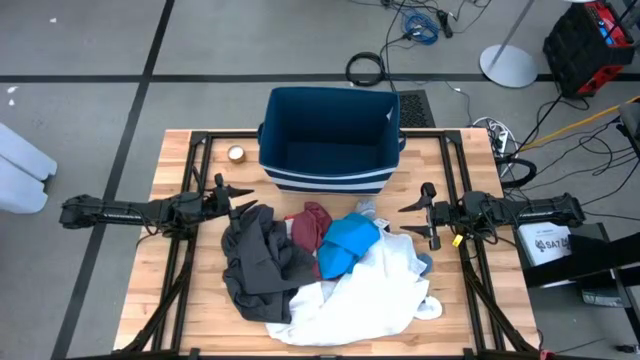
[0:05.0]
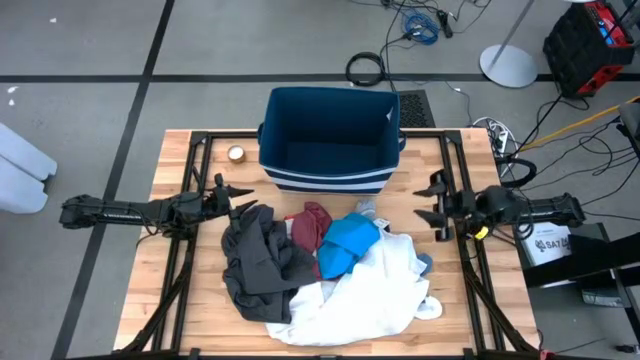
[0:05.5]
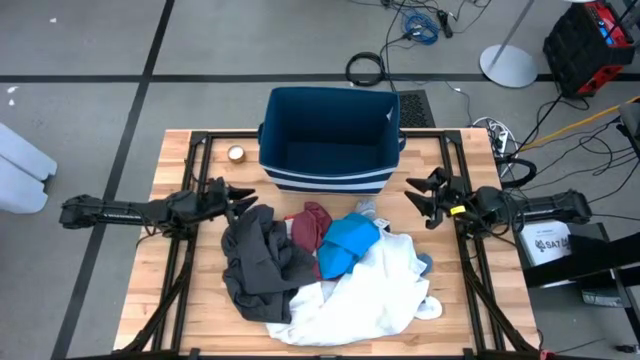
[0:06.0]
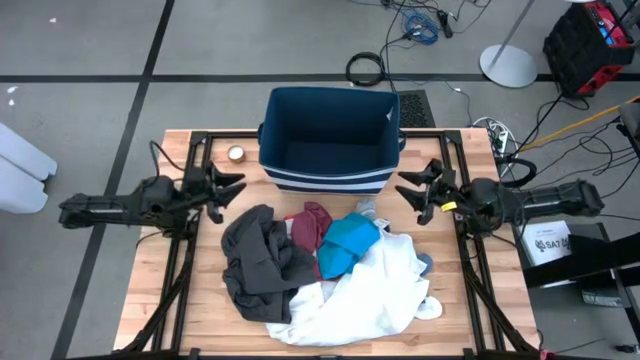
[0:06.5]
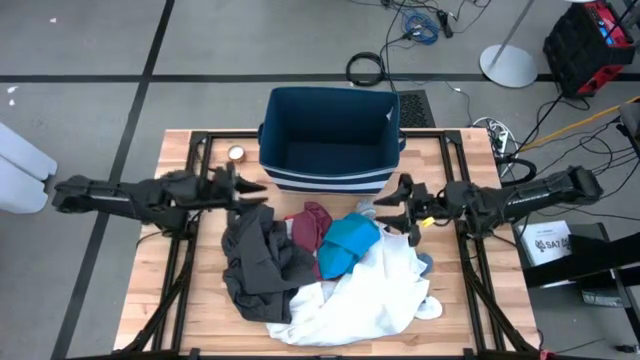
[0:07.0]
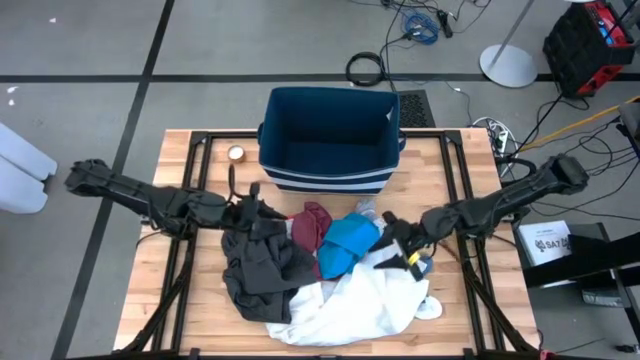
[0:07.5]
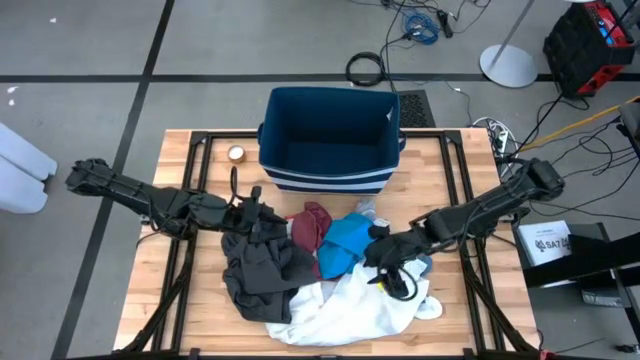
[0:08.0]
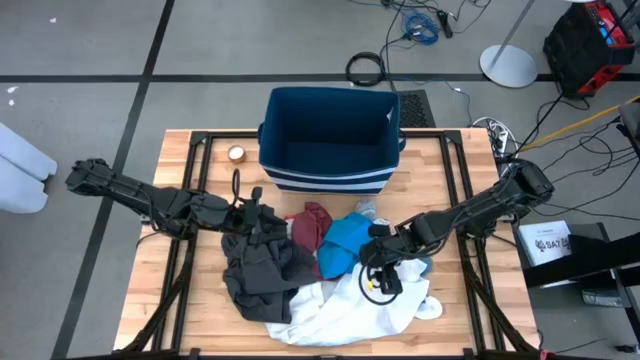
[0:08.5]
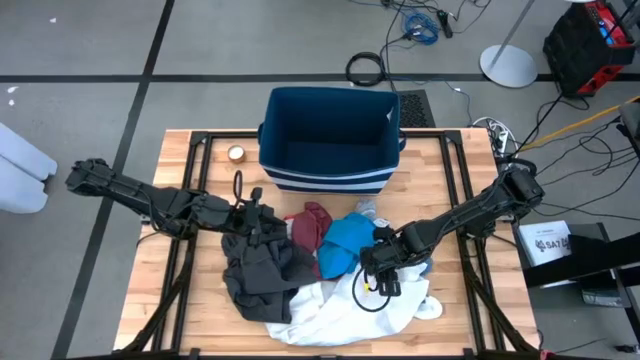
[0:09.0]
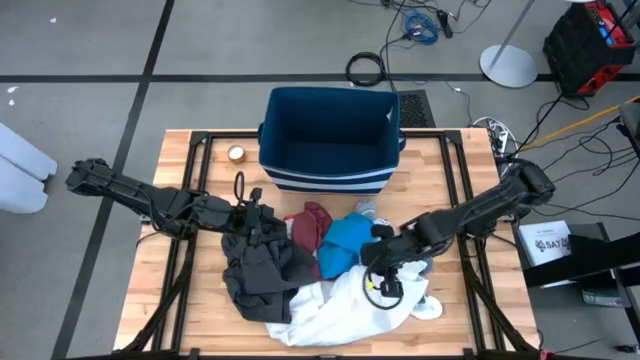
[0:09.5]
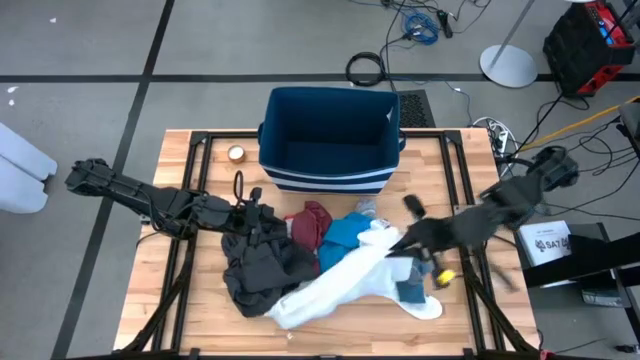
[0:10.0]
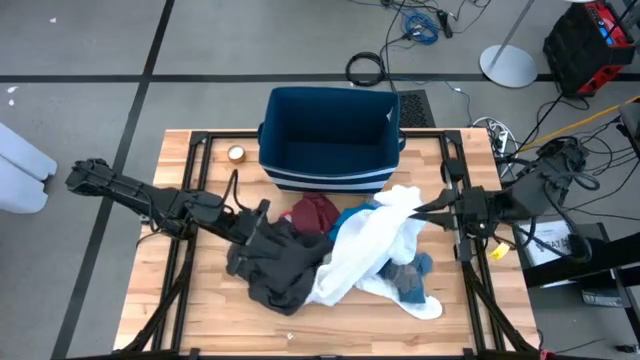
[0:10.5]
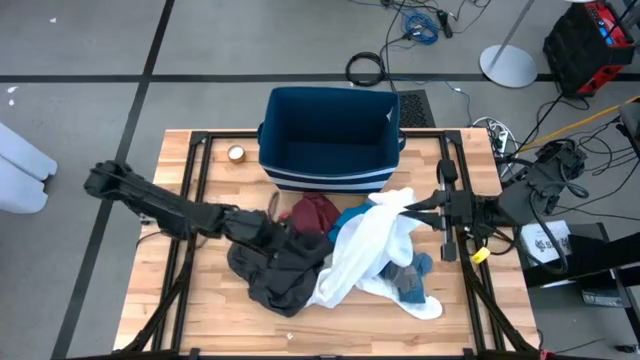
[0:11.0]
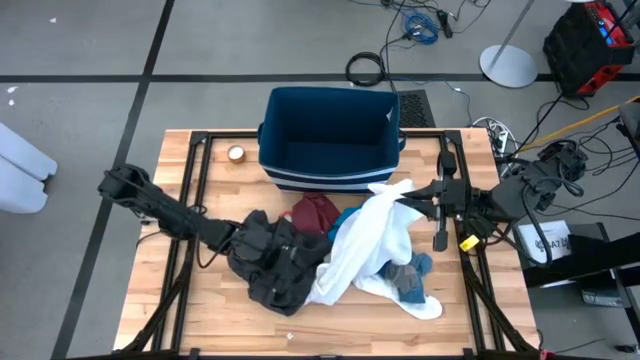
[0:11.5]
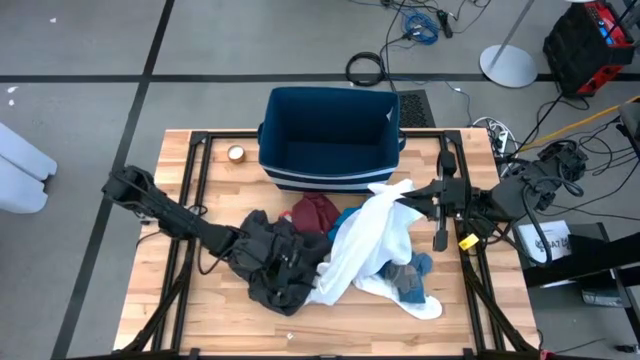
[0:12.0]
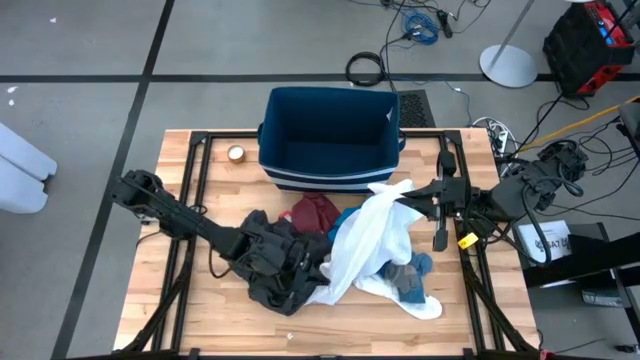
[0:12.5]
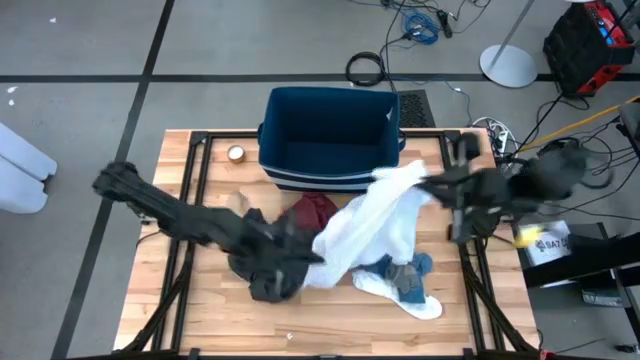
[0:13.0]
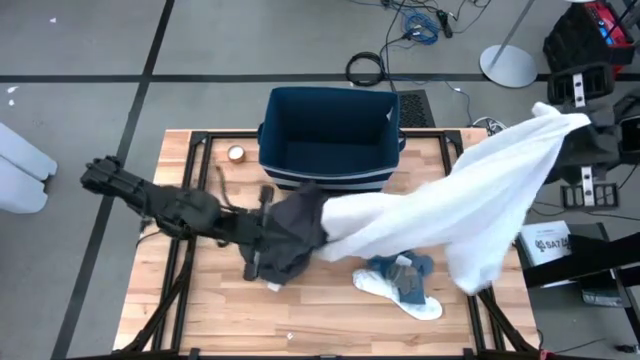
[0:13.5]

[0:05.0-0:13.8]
Task: Sort clothes
Put the white shirt into the blue bin

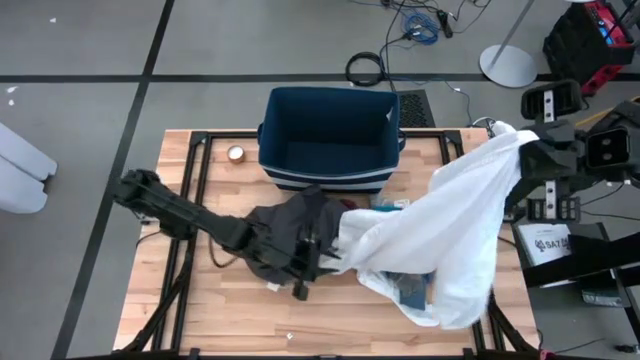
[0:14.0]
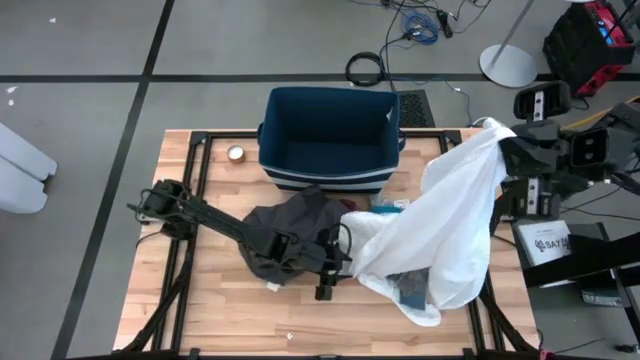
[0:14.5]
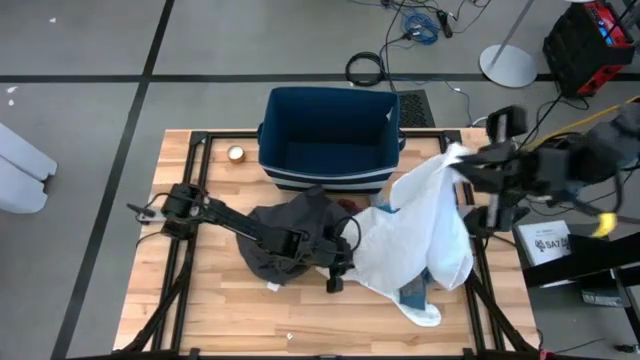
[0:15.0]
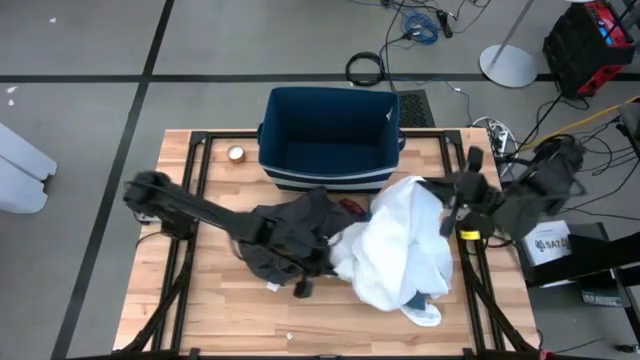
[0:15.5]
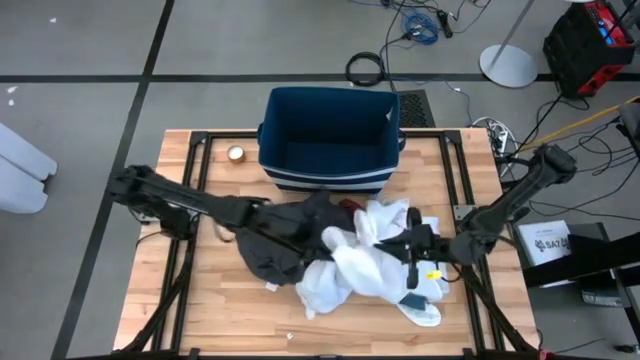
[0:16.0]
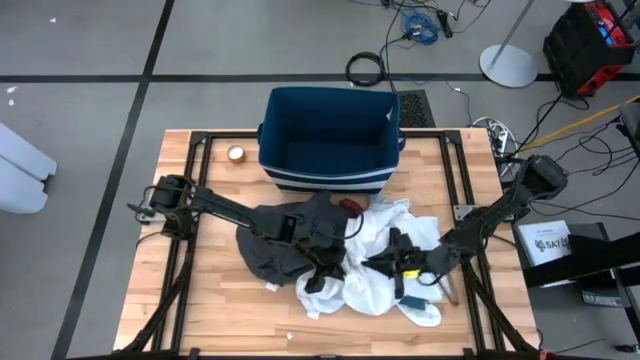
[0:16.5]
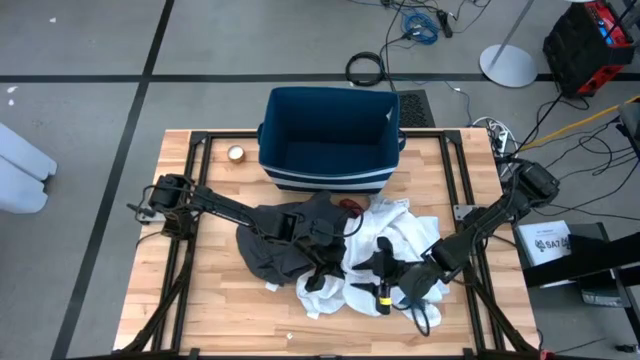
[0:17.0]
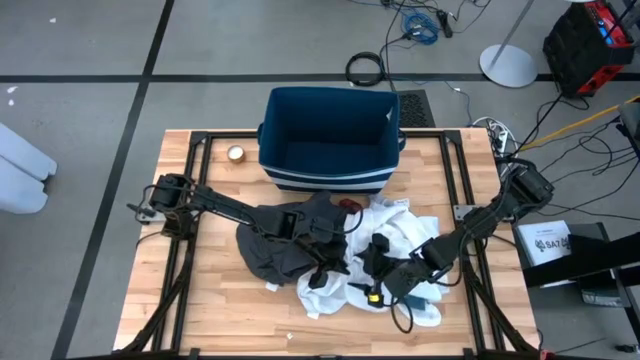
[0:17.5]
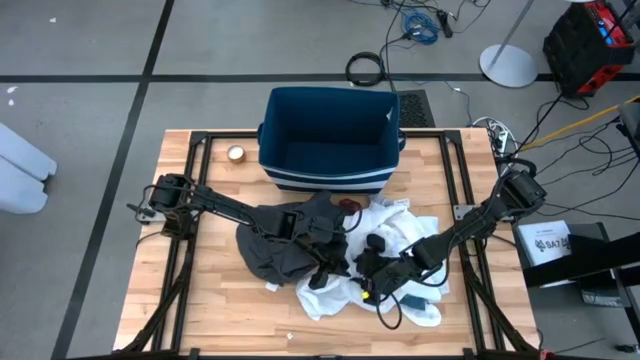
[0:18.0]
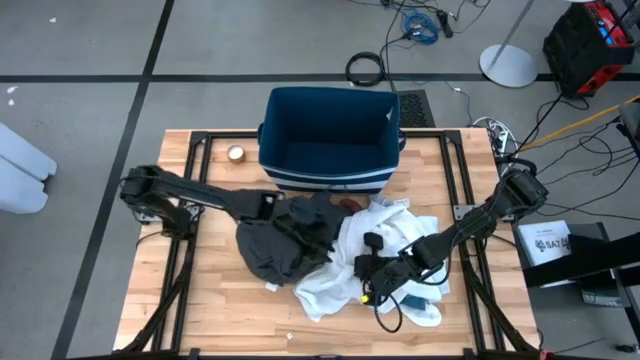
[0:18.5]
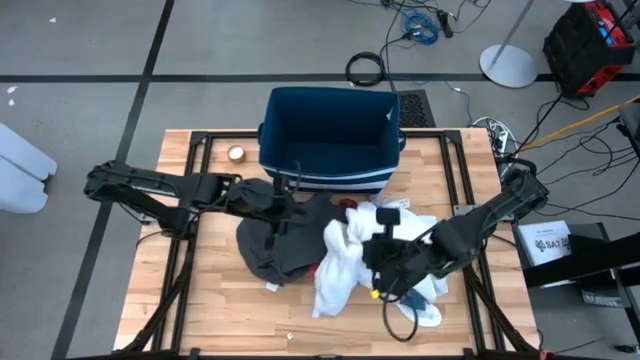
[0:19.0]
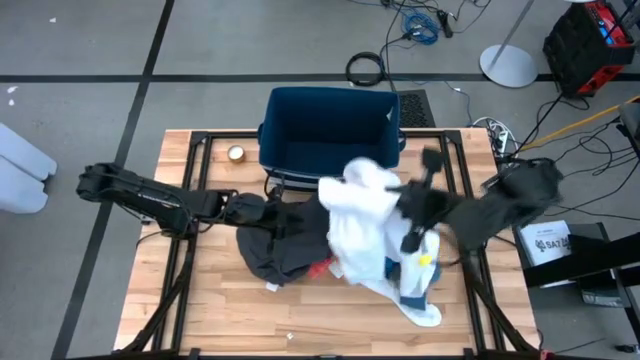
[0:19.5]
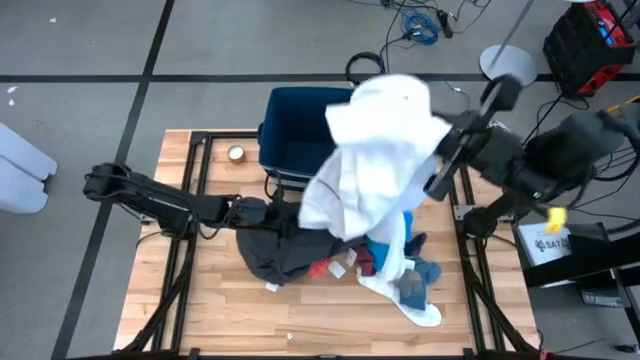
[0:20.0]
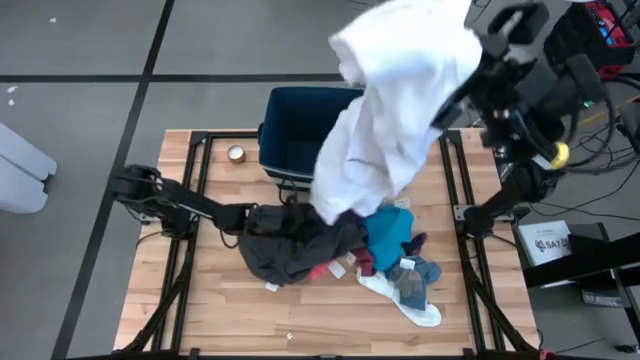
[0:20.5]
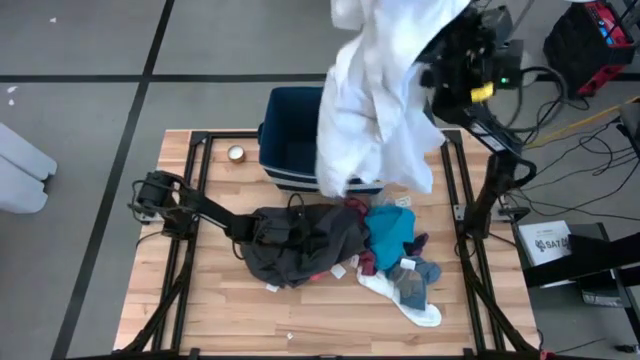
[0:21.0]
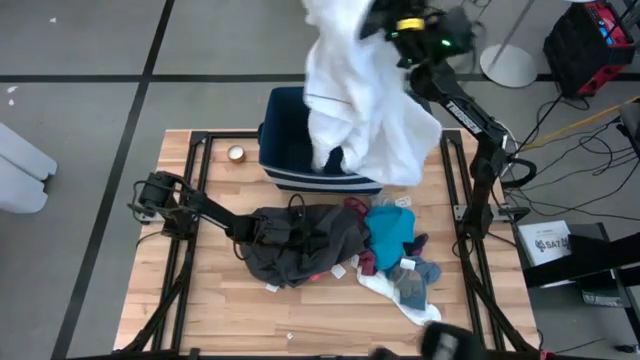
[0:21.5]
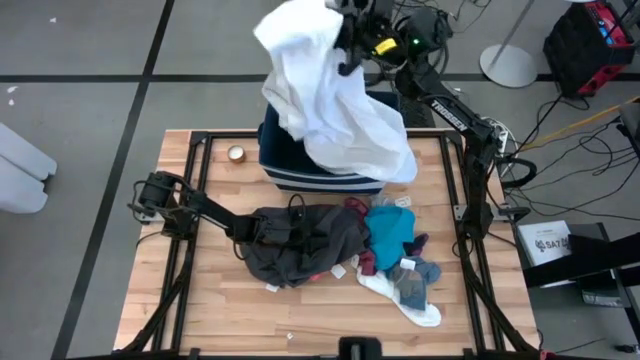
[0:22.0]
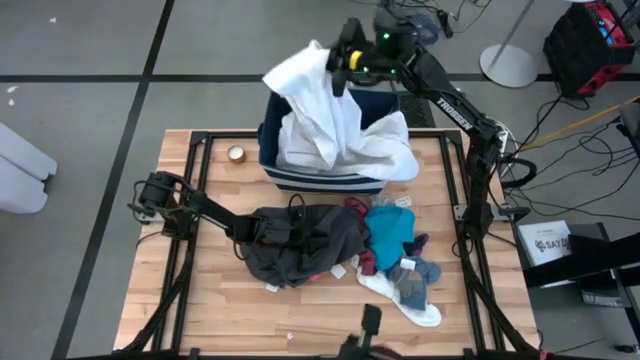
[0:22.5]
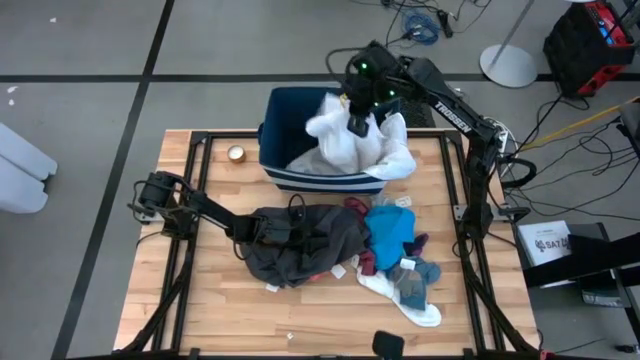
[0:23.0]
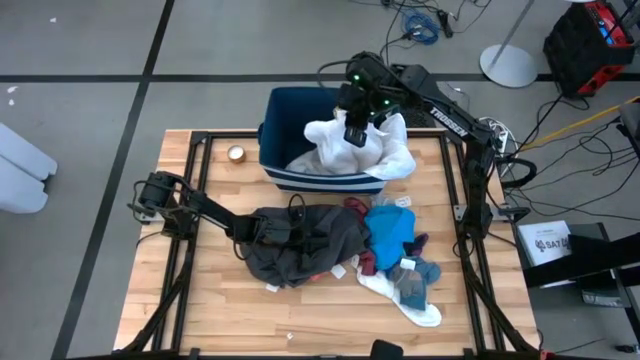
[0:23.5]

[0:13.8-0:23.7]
Put the white shirt into the blue bin

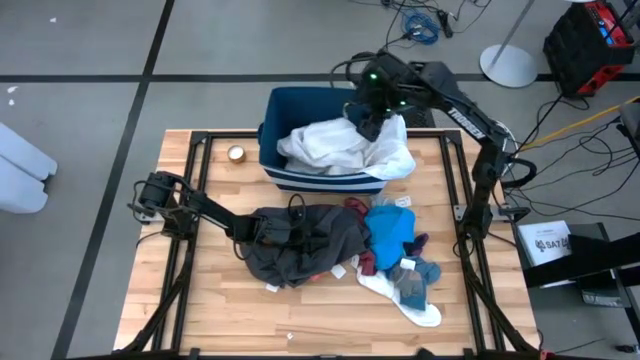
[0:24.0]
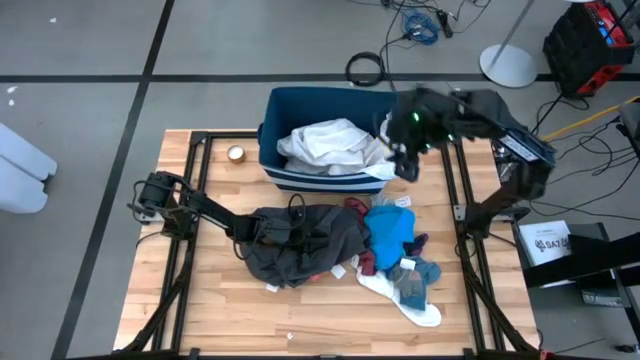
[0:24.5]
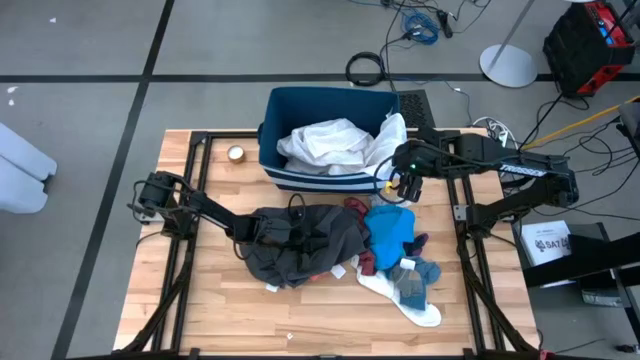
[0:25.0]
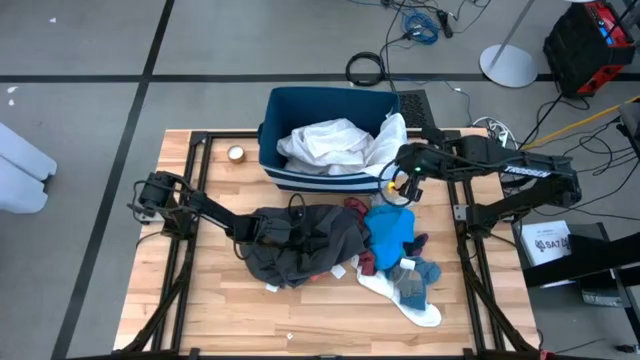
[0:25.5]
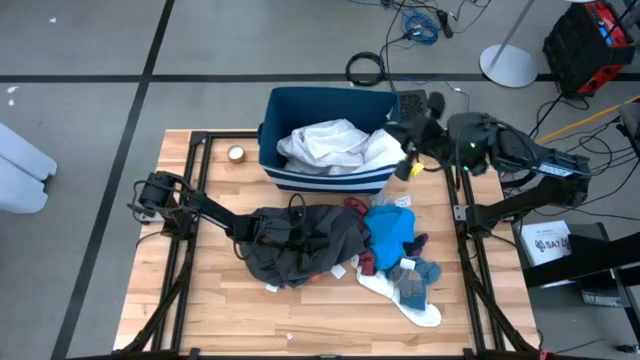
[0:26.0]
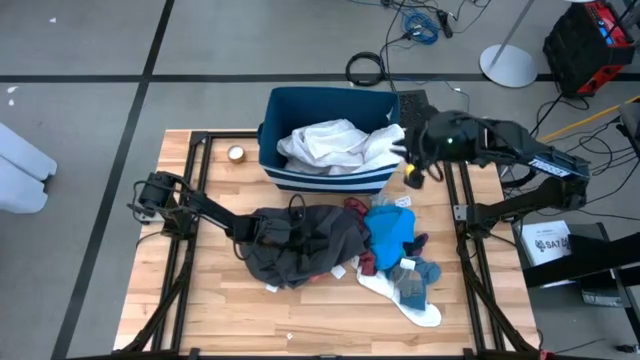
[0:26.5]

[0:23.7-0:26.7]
Put the white shirt into the blue bin

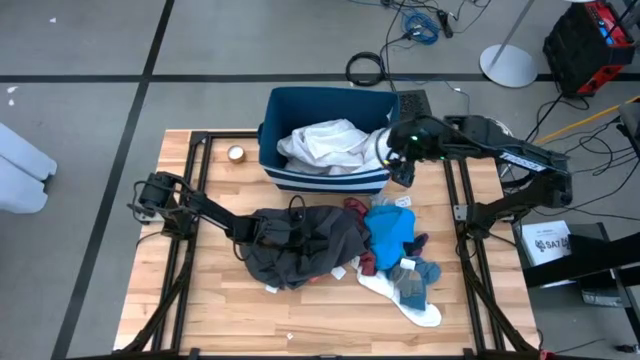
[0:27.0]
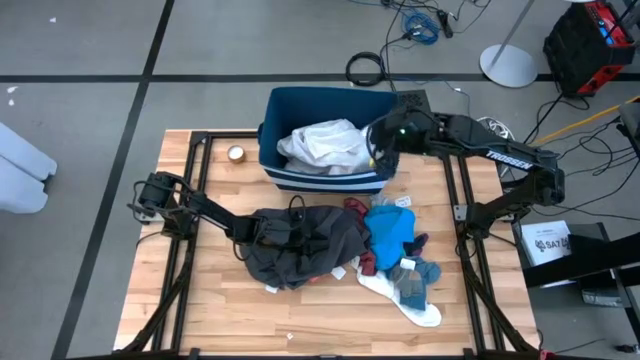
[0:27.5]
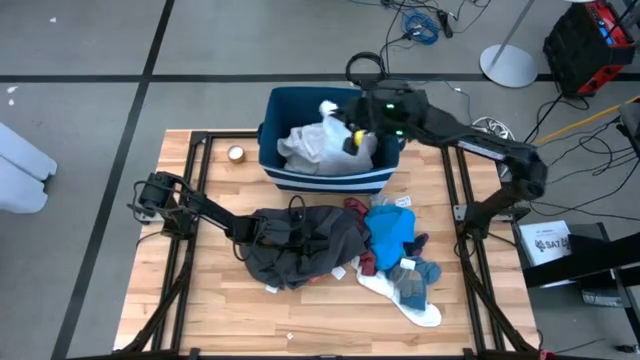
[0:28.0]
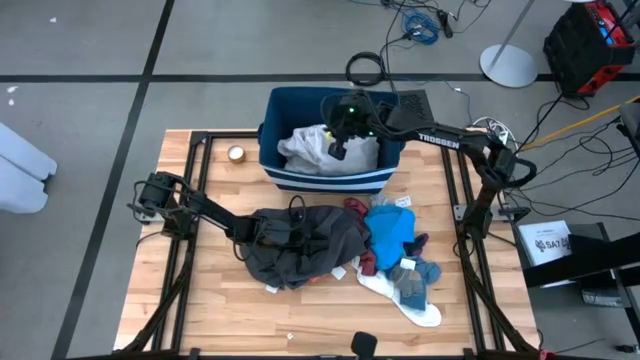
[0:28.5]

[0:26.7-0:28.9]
Put the white shirt into the blue bin
